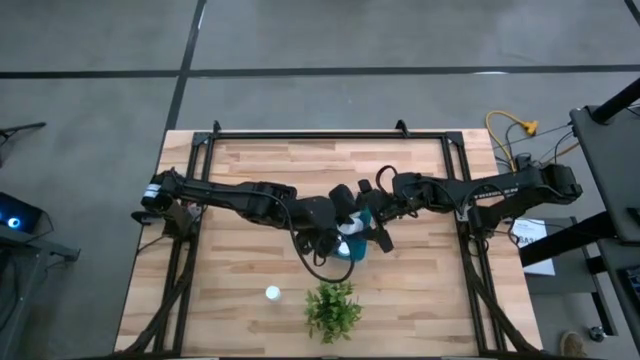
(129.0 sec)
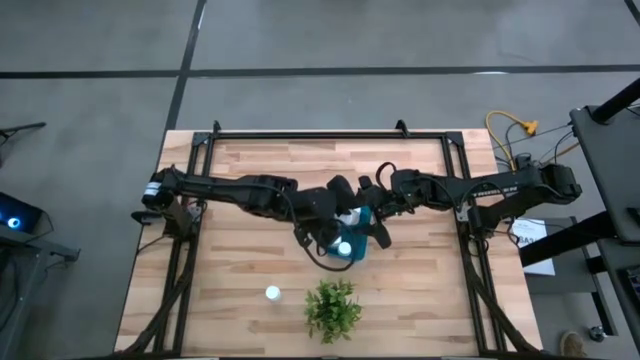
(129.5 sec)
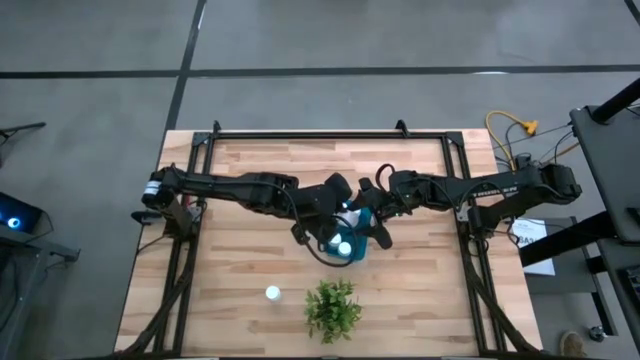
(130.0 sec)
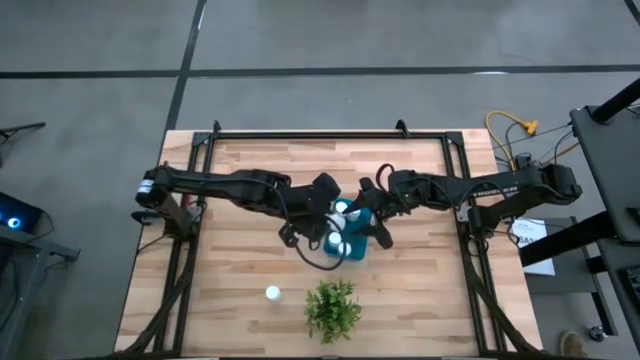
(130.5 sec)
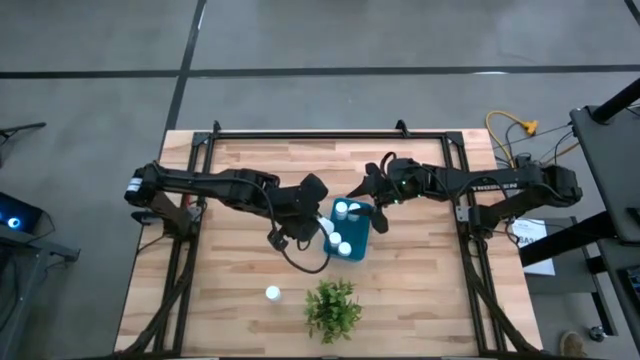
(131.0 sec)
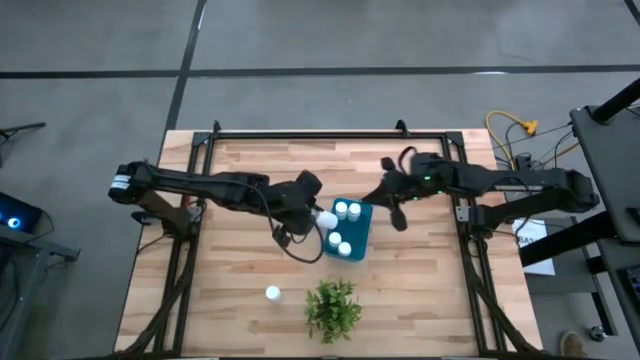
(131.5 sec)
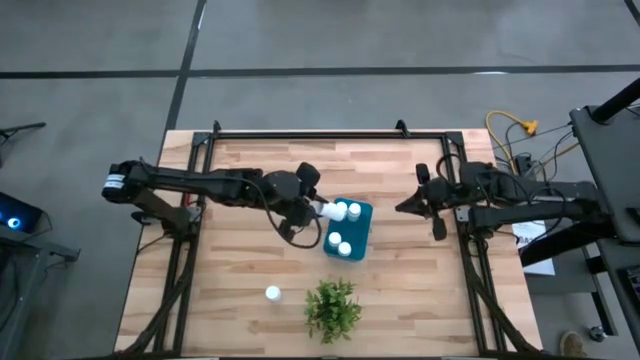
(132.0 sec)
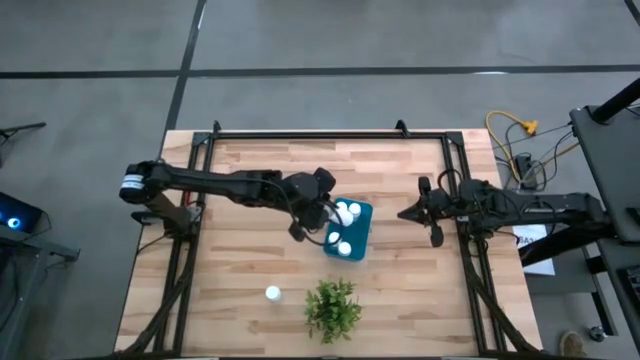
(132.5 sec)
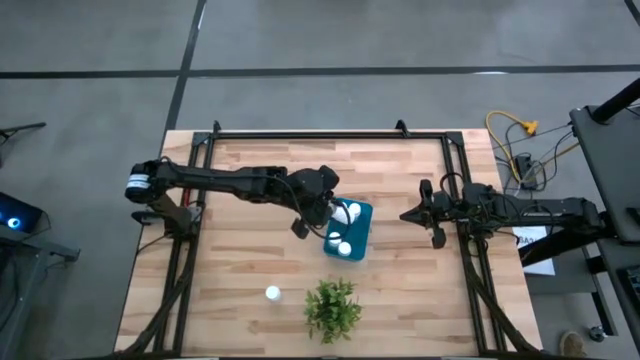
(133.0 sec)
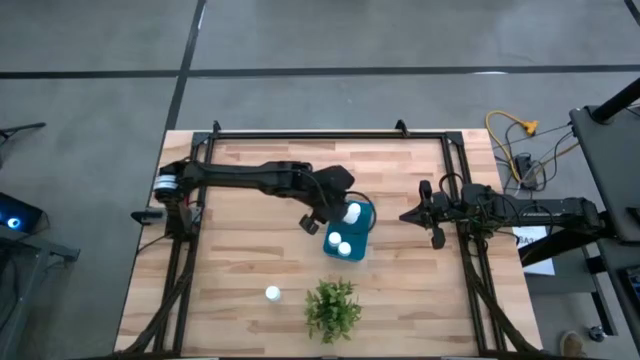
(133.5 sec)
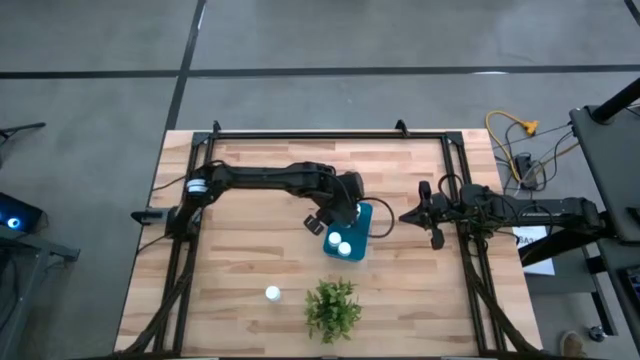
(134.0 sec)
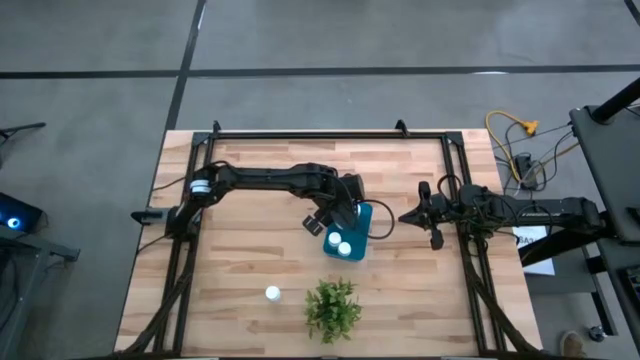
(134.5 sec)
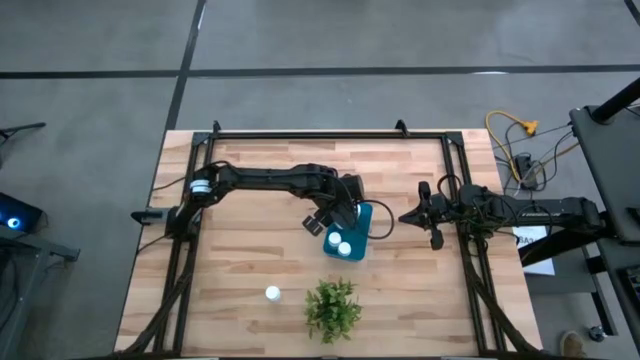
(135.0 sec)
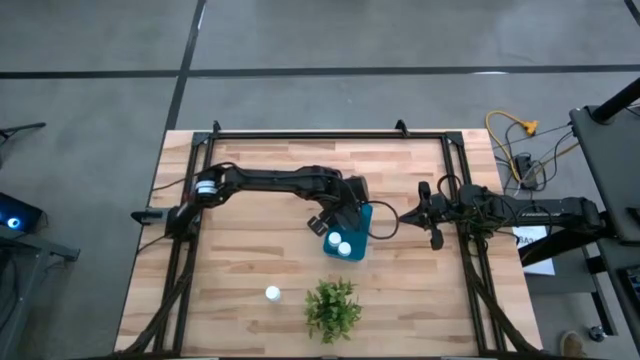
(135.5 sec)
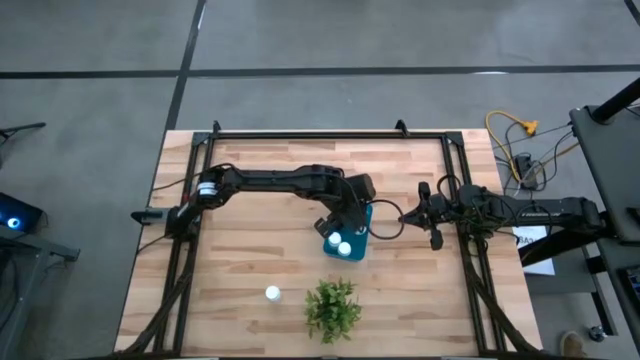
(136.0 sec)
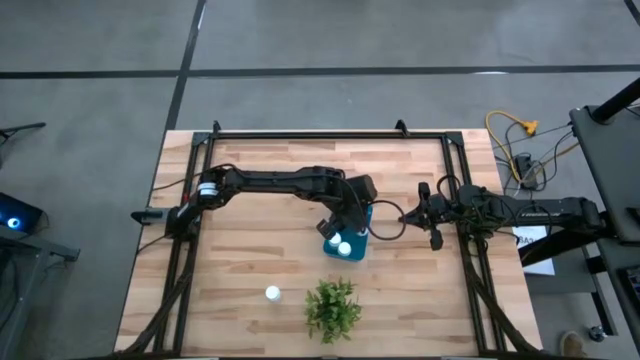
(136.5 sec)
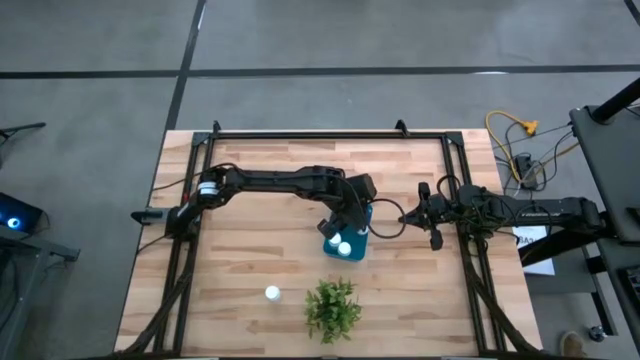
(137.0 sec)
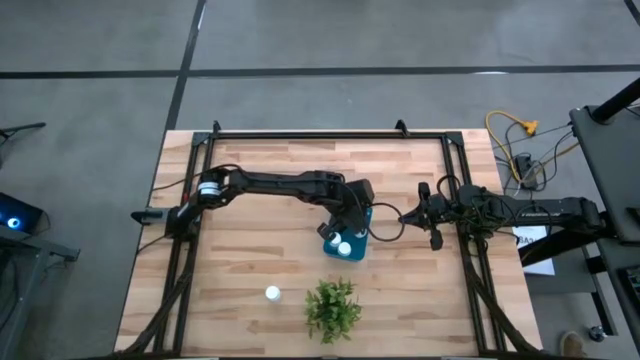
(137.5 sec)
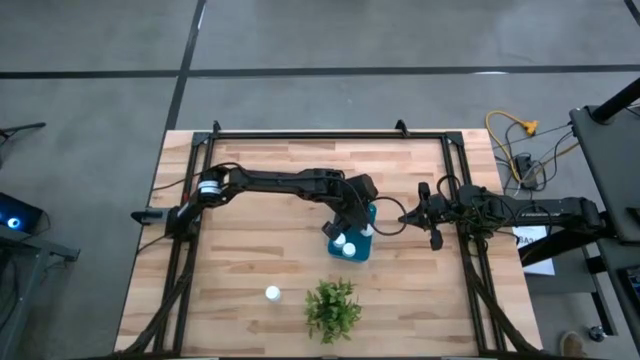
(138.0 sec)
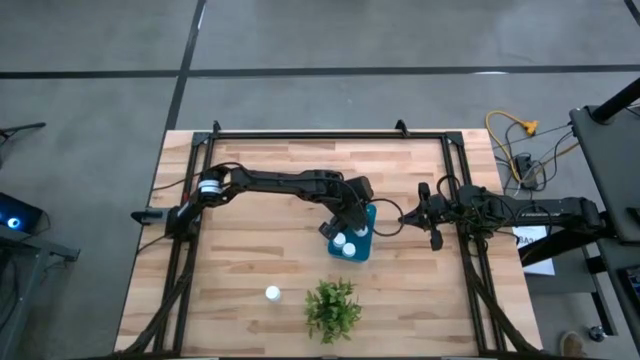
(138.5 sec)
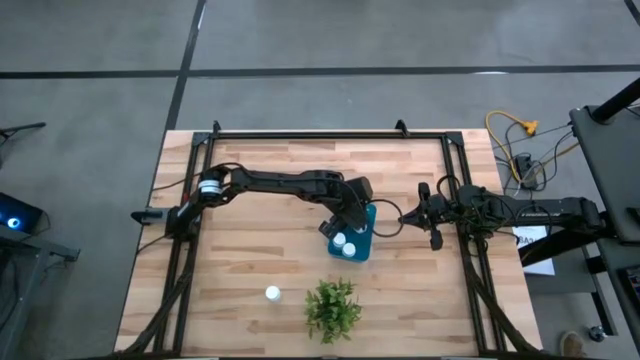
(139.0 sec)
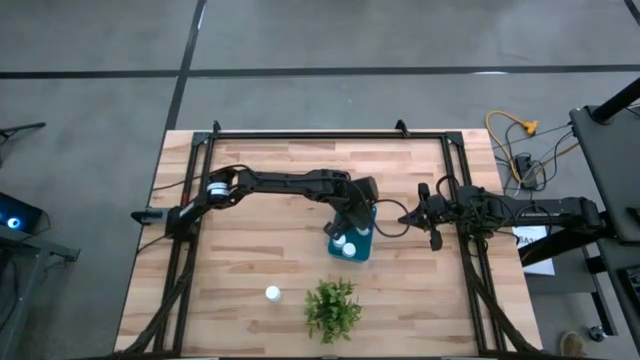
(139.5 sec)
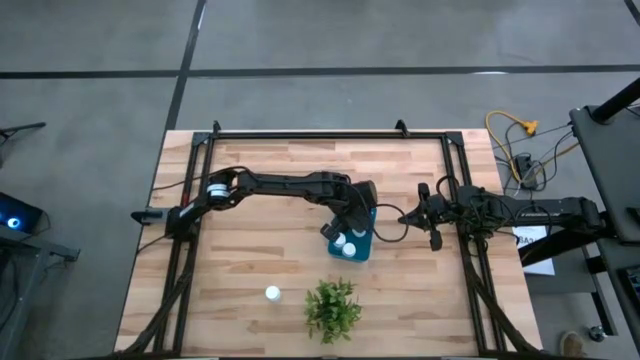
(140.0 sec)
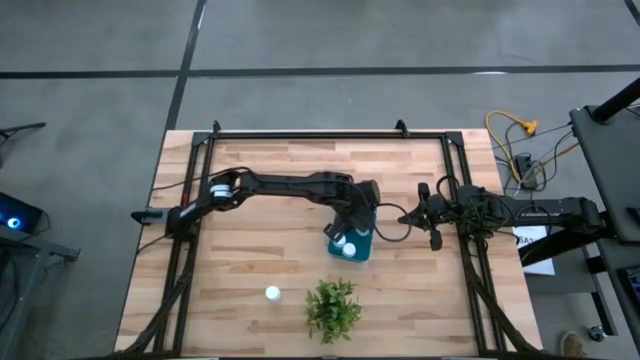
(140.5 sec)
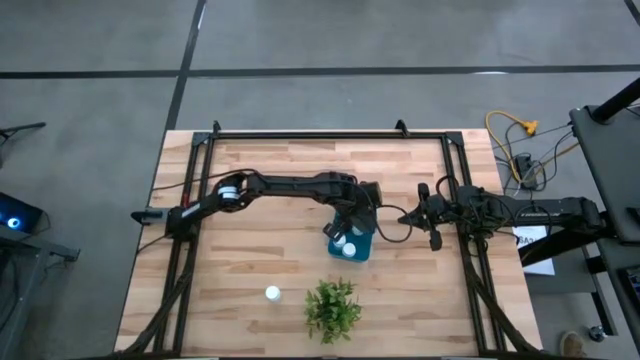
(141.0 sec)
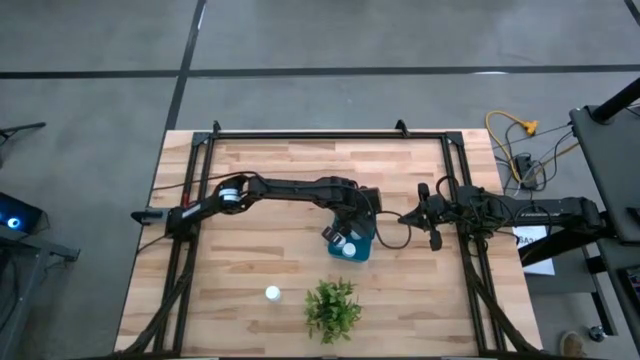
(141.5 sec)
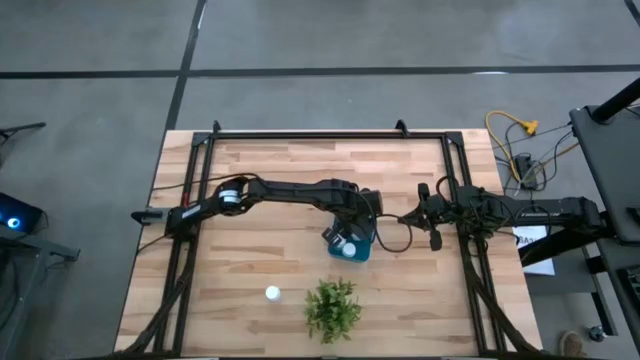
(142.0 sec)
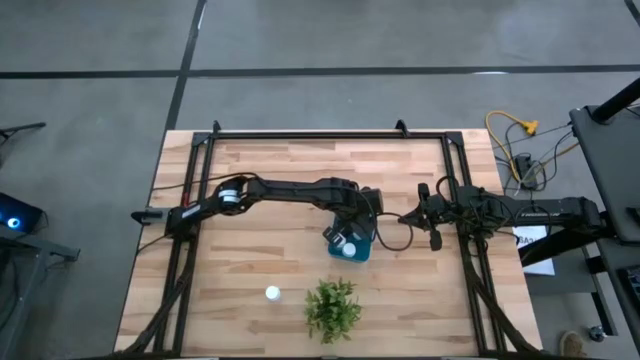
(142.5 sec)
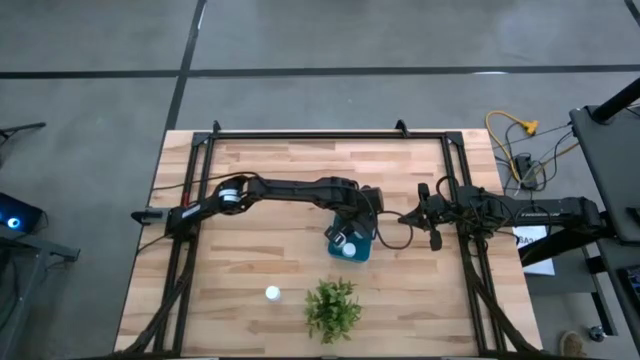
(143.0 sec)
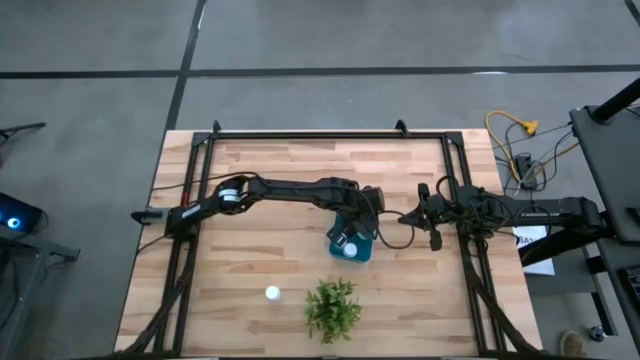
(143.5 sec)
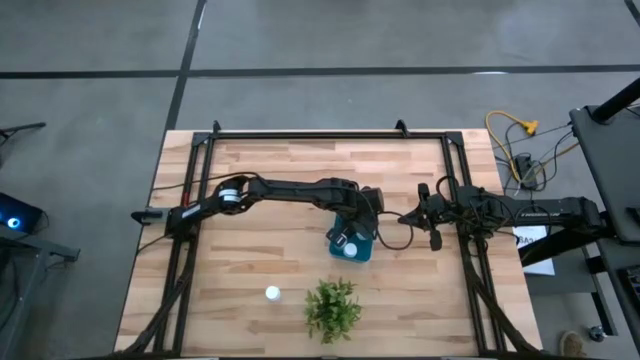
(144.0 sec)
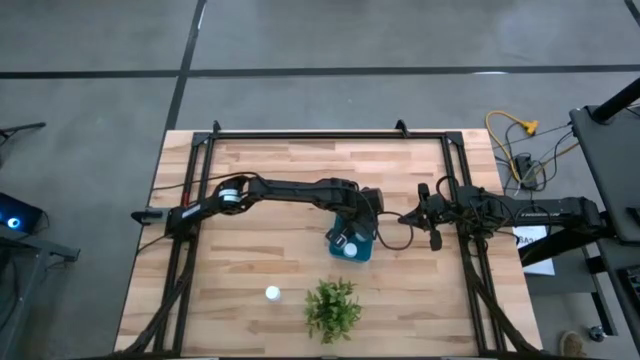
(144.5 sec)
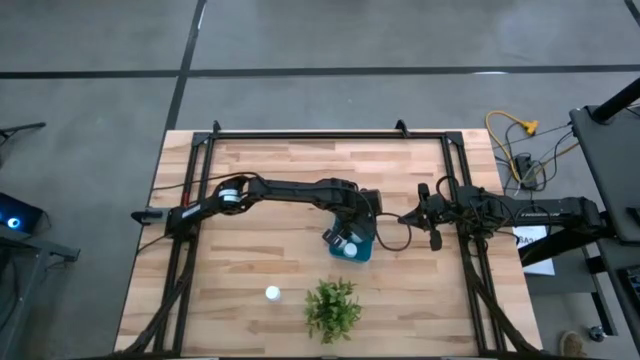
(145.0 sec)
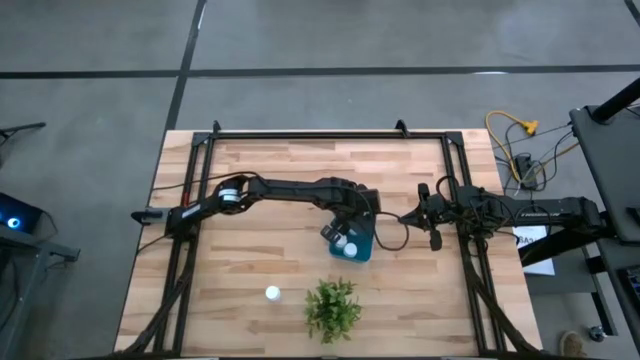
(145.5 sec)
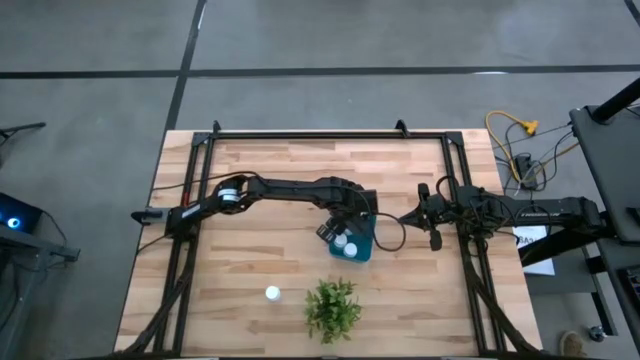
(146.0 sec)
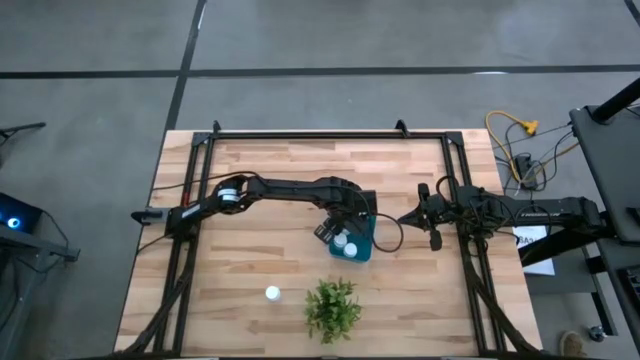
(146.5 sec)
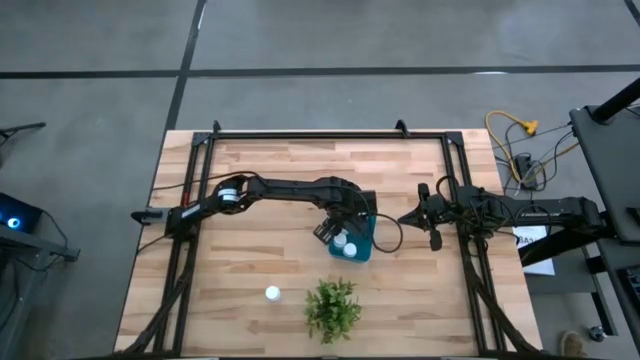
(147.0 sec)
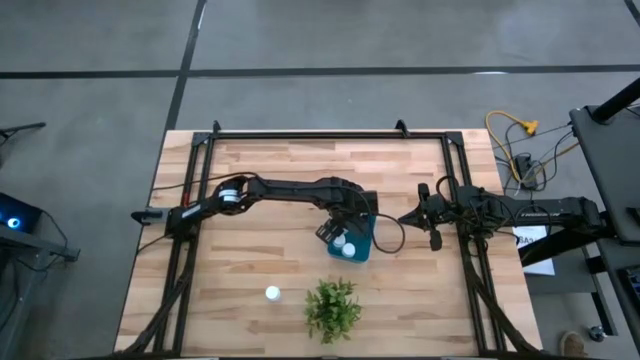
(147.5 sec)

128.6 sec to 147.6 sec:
Task: Pick and place pill bottles into a basket
Put the white pill bottle into the blue bin

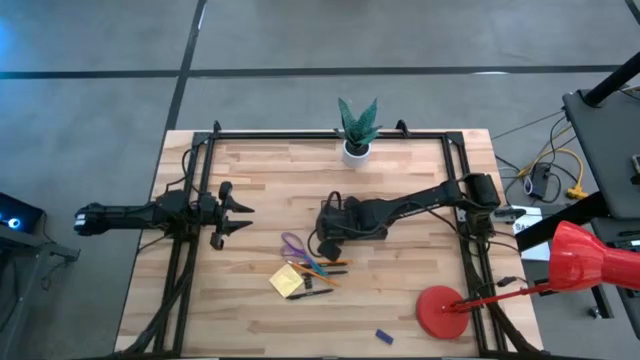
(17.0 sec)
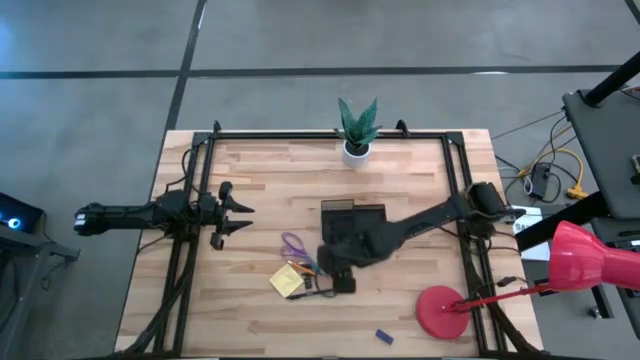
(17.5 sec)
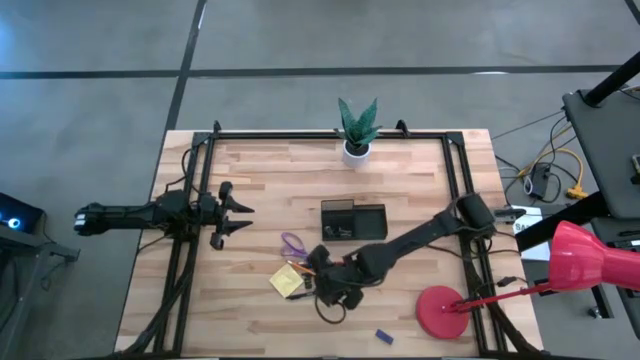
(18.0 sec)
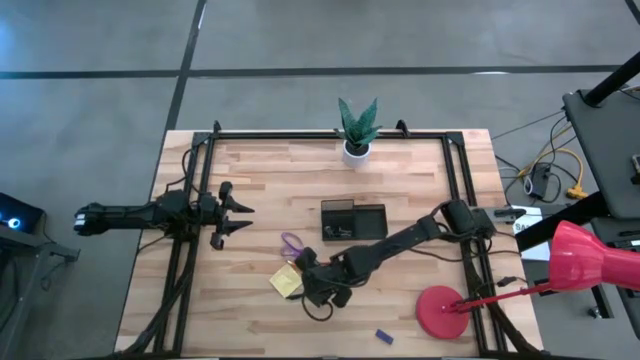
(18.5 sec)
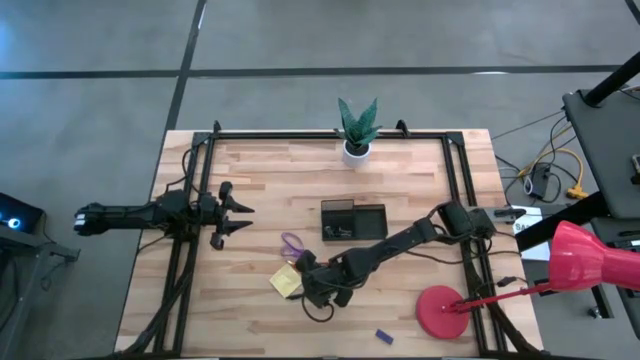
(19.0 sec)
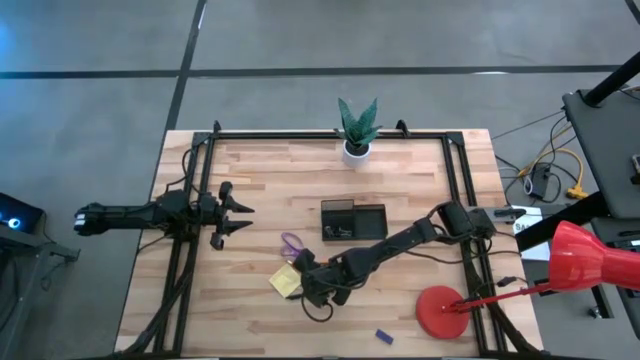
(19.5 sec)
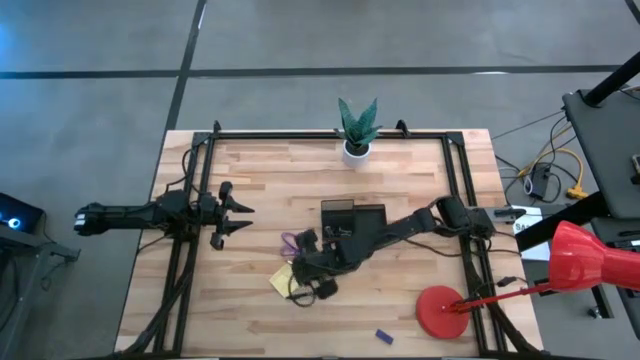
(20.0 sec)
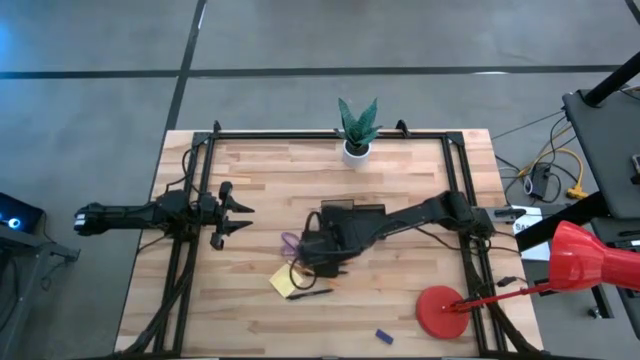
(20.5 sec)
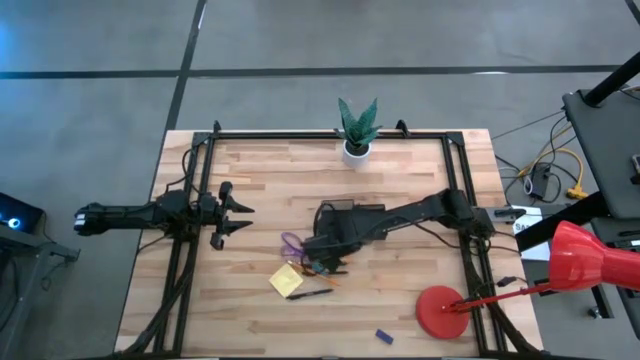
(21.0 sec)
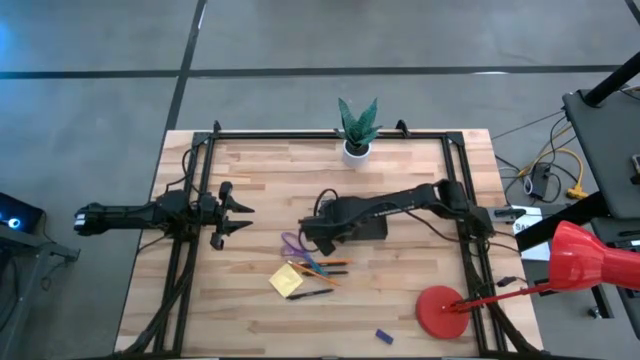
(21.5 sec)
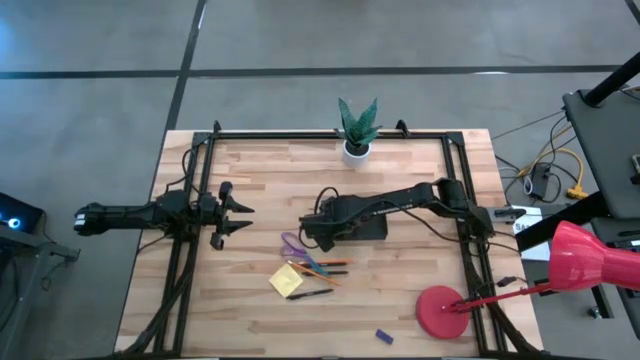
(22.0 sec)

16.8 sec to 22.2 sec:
Task: Pick and place office supplies into organizer
Put the black clip into the black organizer
